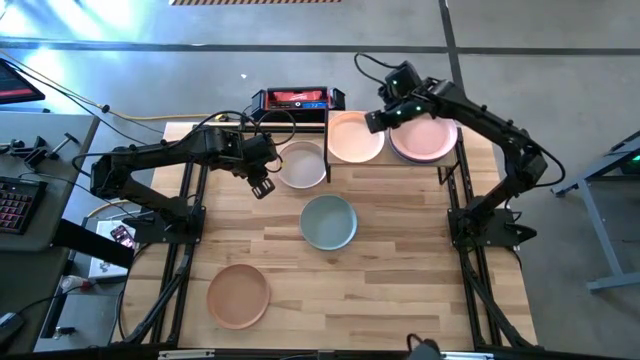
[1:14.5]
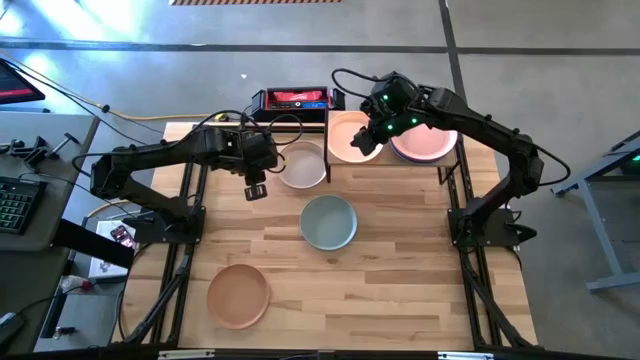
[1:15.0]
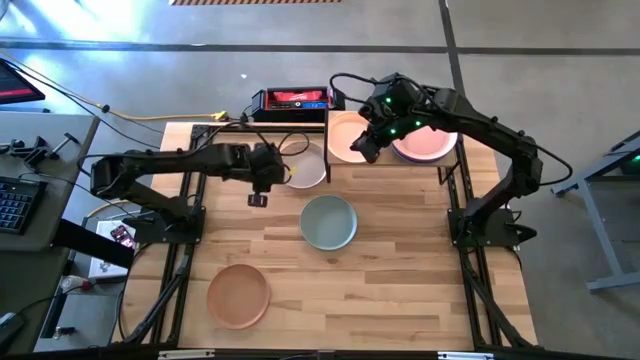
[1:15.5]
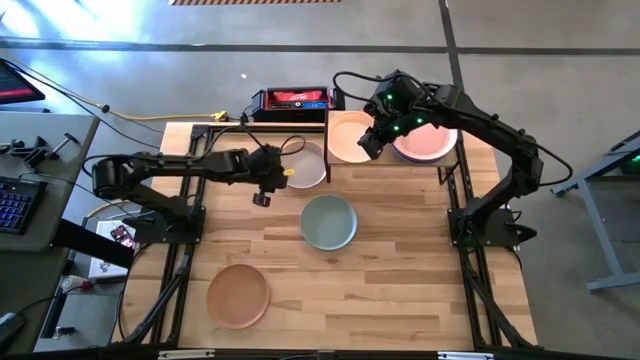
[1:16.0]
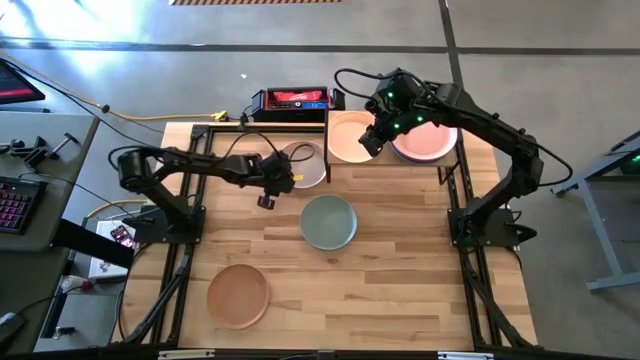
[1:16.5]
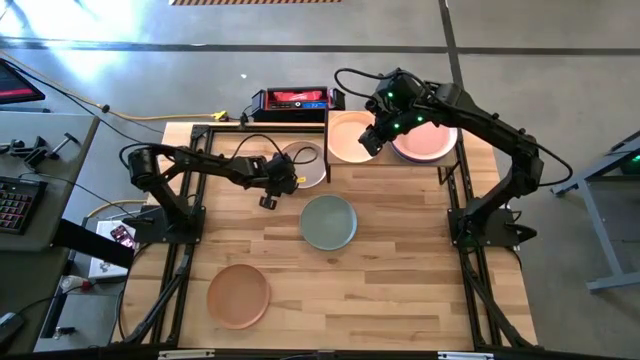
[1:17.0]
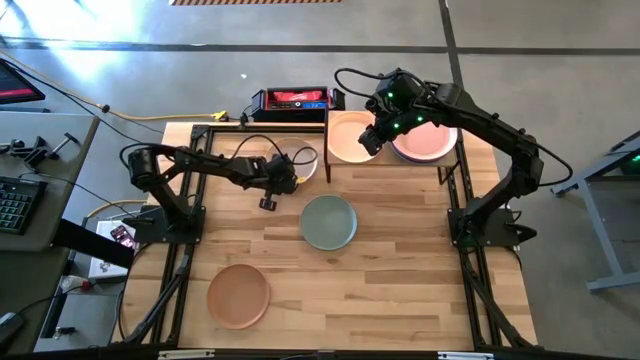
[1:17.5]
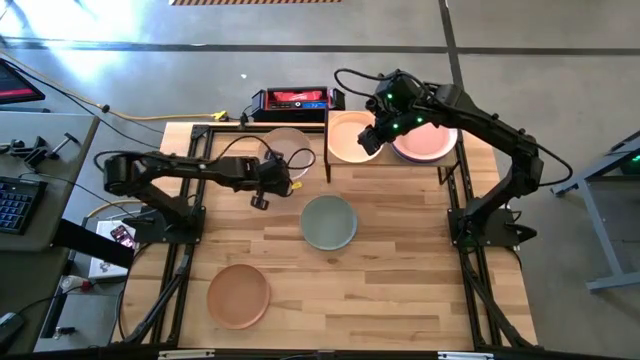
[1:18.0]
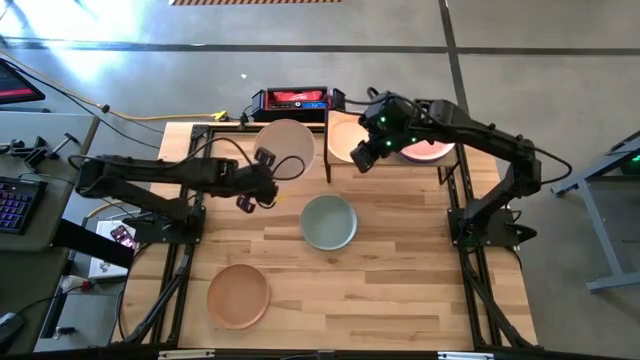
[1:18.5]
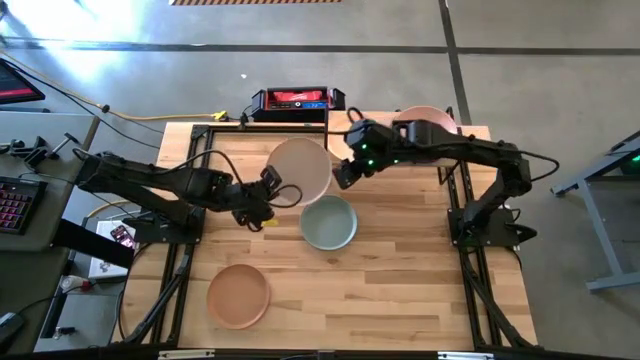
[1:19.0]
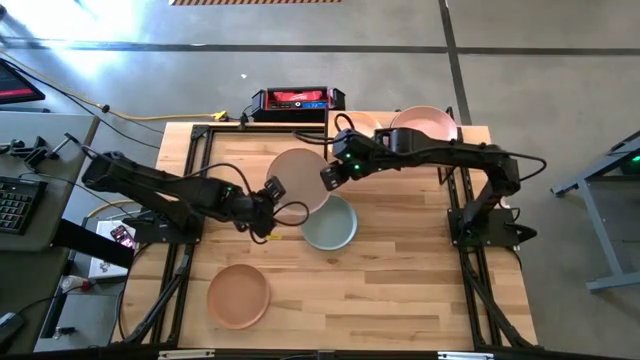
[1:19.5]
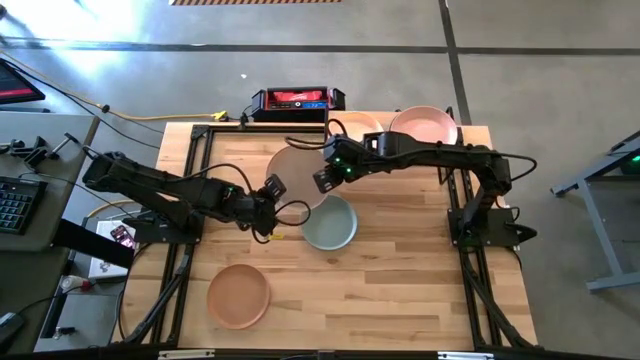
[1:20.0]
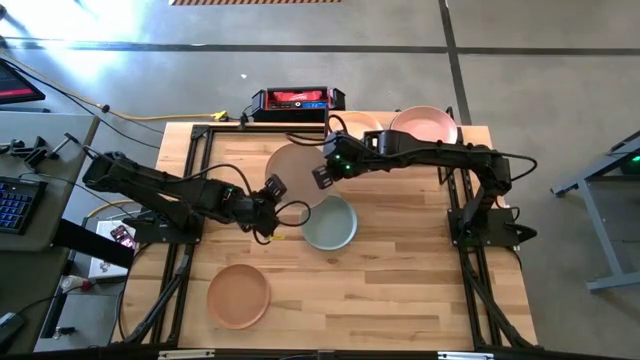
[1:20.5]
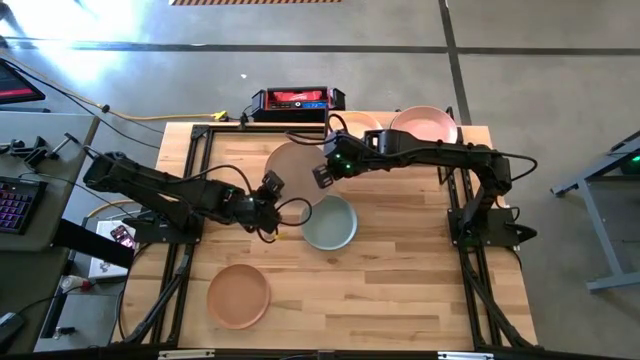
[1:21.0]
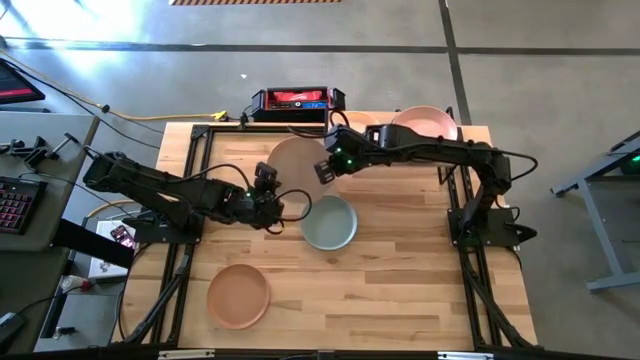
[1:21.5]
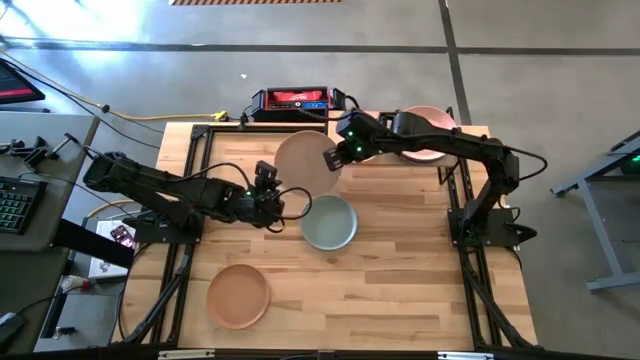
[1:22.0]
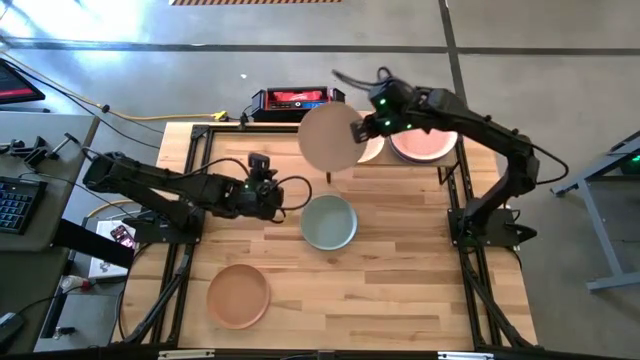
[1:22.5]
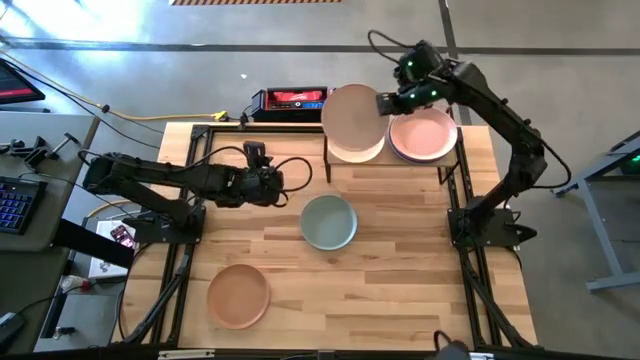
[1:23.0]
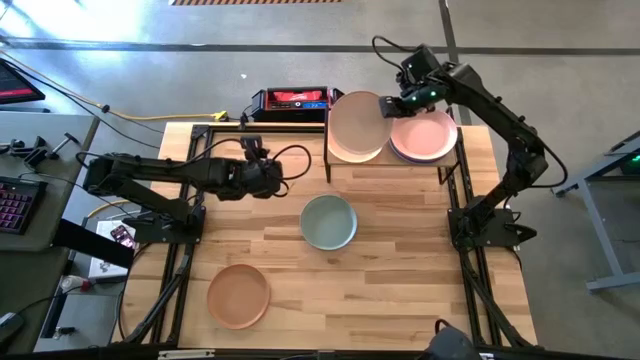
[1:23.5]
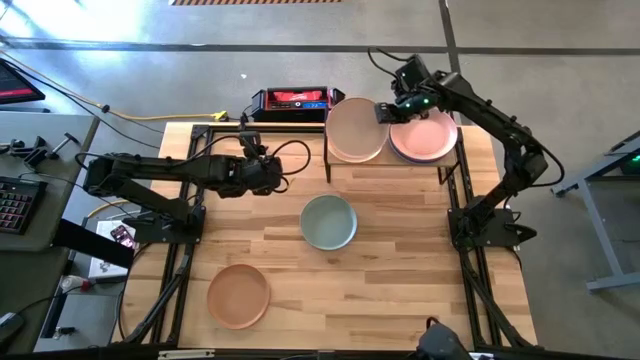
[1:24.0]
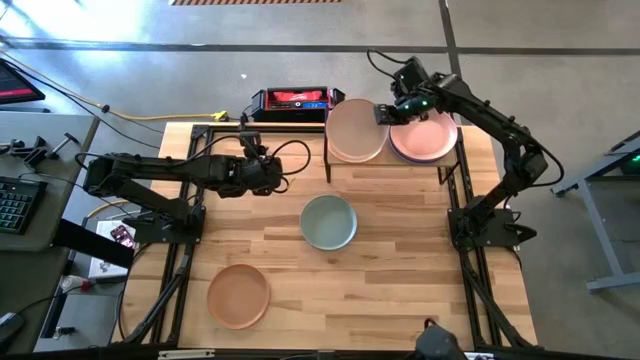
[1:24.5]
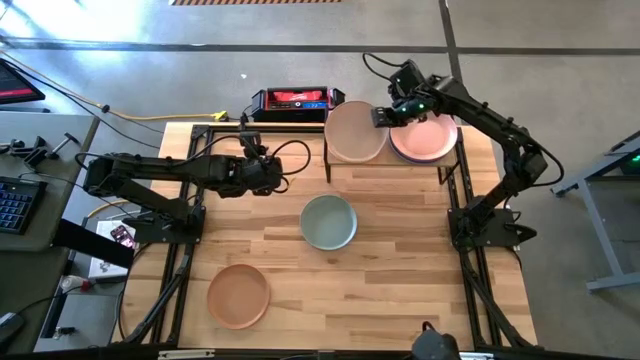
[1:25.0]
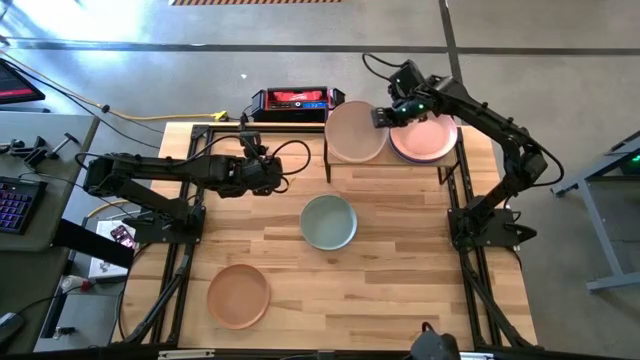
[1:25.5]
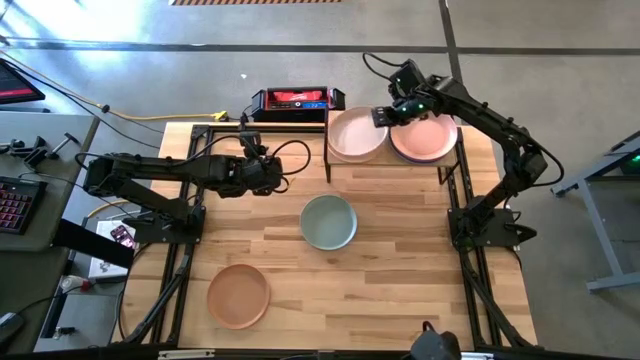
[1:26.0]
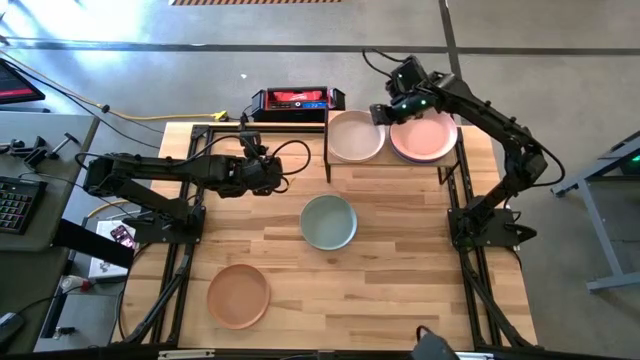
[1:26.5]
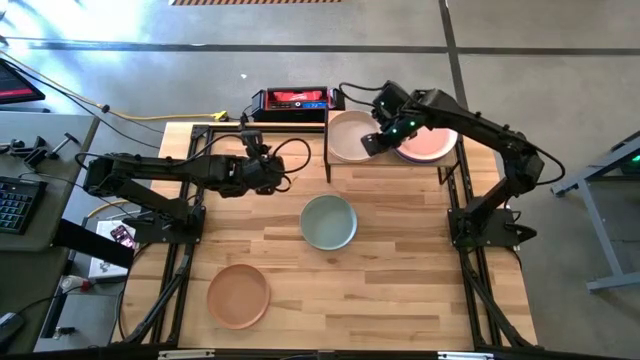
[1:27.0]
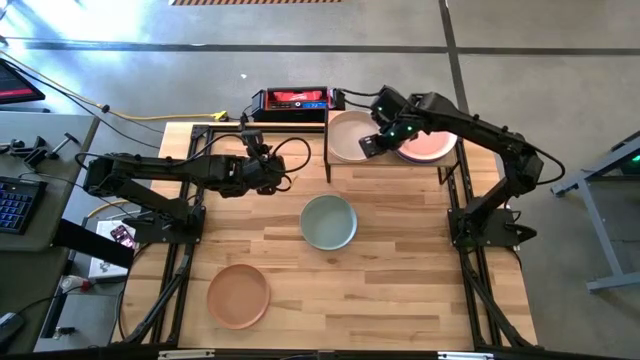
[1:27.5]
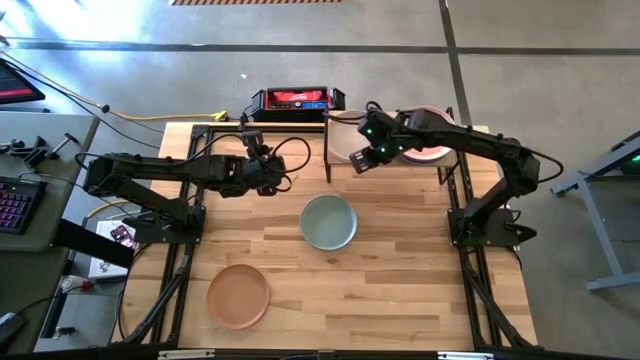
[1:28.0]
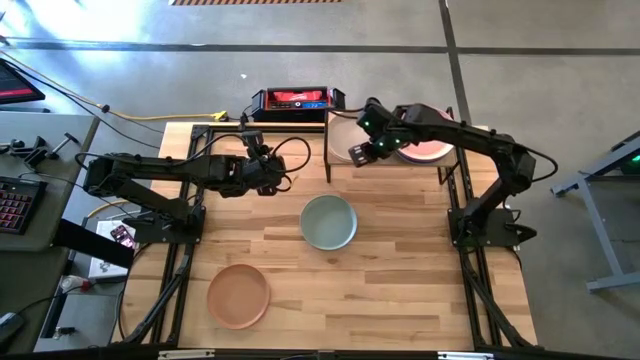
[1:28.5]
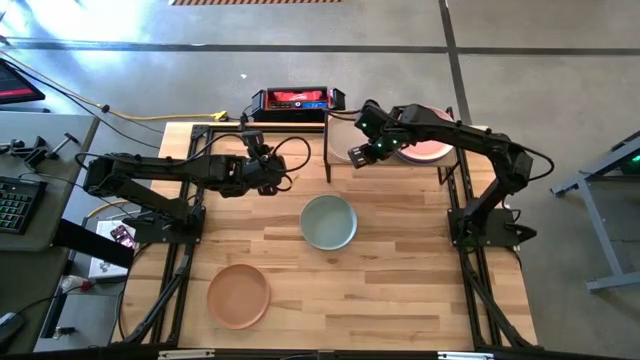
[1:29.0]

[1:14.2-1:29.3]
Task: Place and stack plates onto a shelf
Stack the gray plate on top of the white plate on the shelf

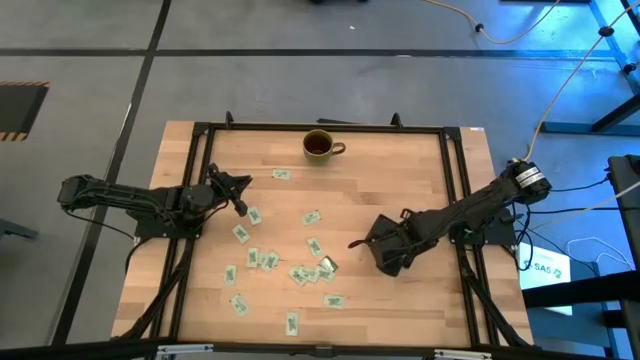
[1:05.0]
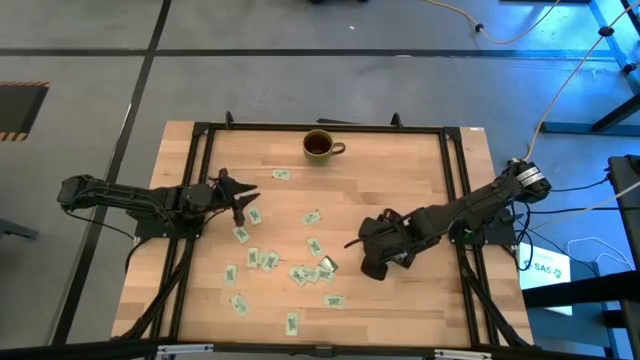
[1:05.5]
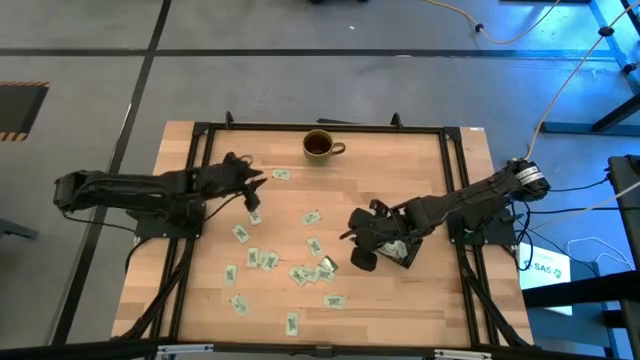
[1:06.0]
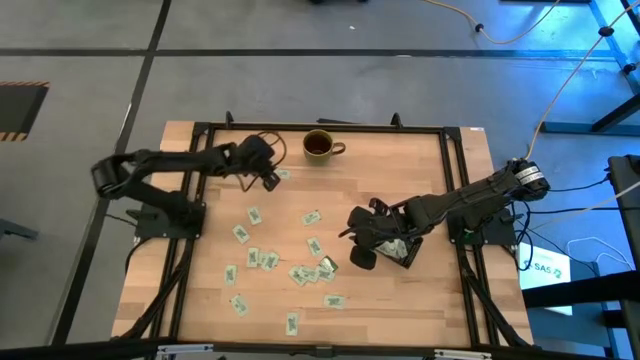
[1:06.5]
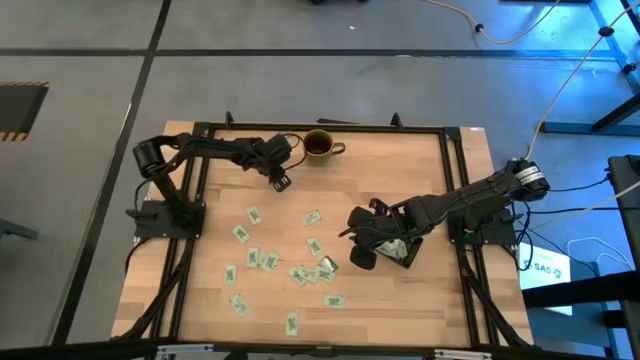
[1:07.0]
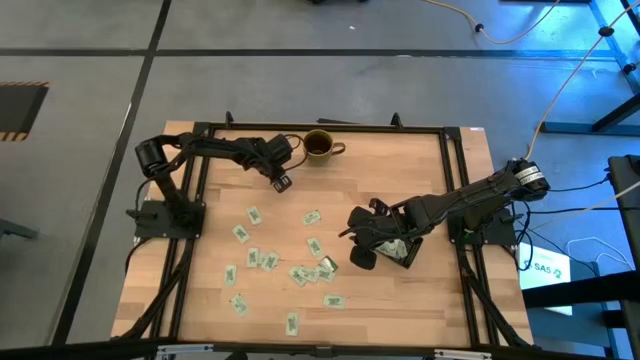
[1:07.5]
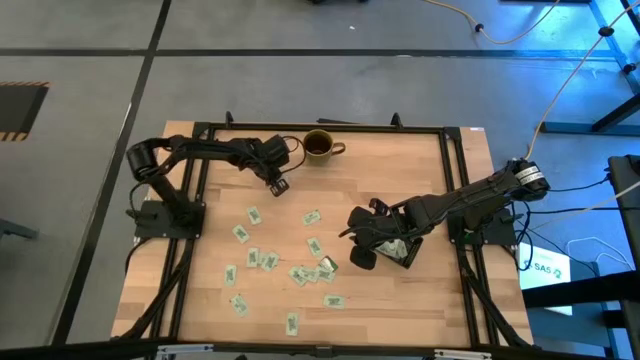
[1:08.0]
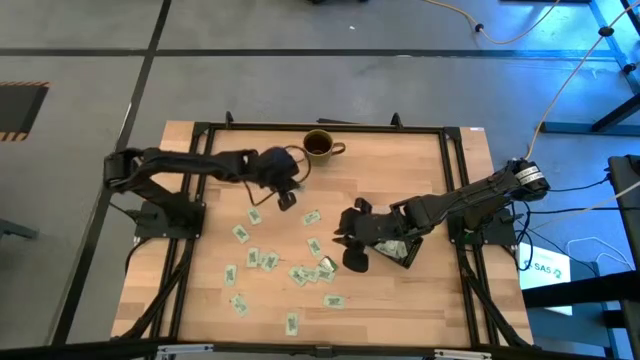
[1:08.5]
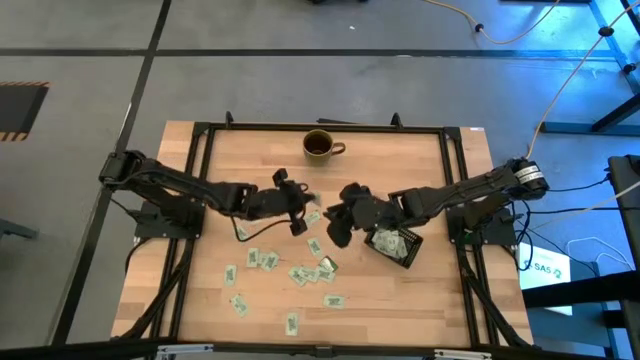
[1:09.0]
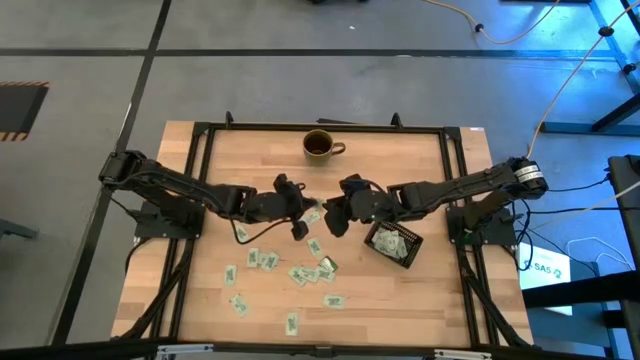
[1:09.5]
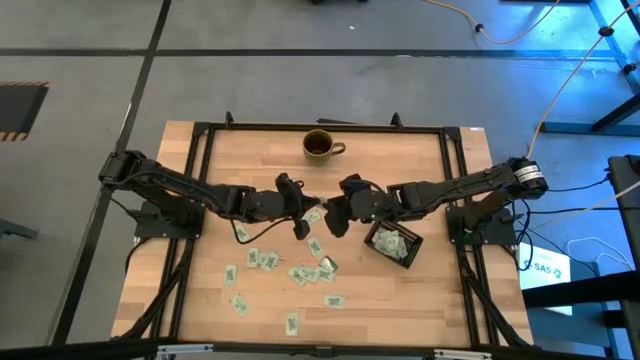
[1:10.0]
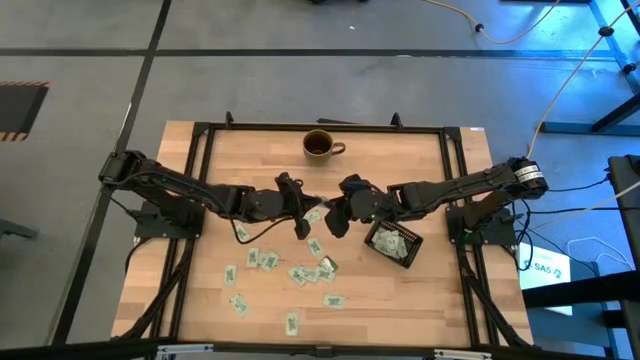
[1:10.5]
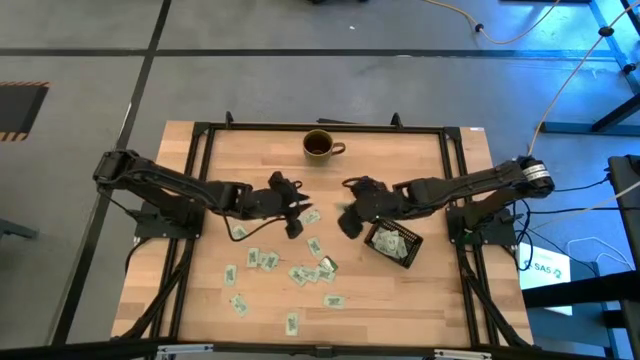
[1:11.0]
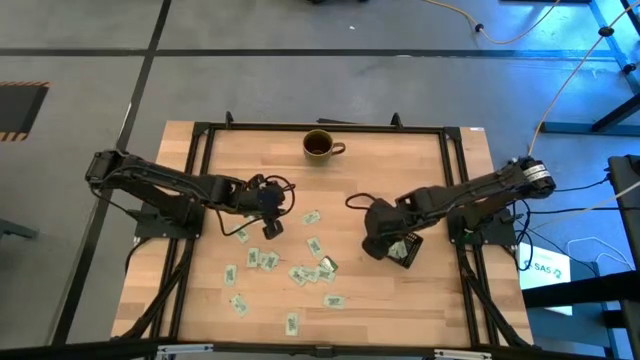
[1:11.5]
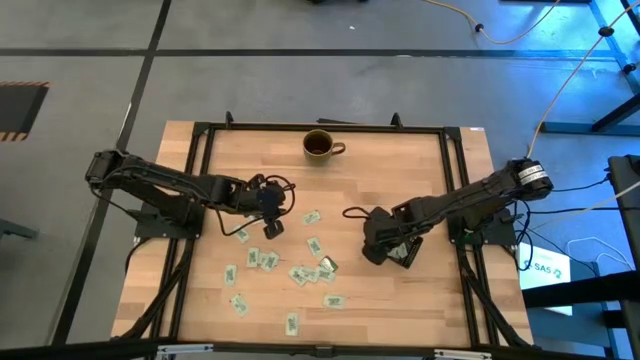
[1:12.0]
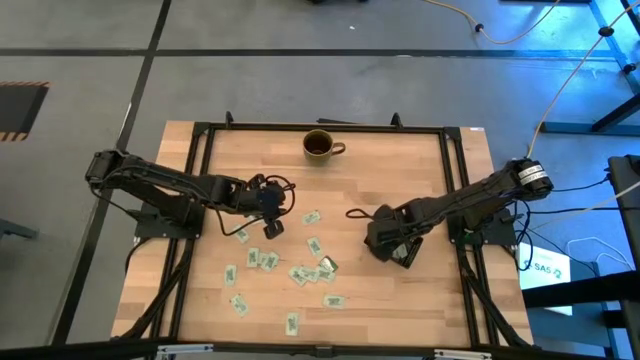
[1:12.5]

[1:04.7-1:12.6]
Task: Pick and place Stevia / Truvia into bins
Put the stevia packet into the black bin
